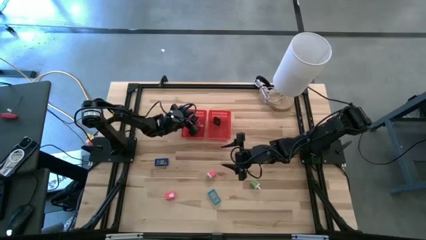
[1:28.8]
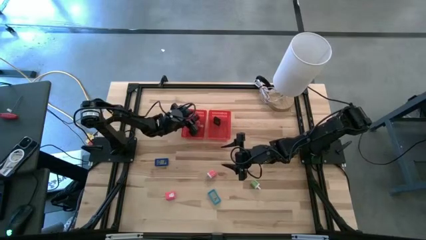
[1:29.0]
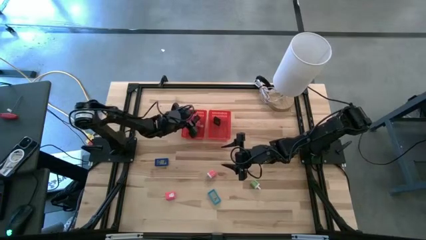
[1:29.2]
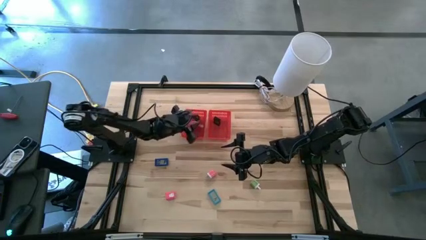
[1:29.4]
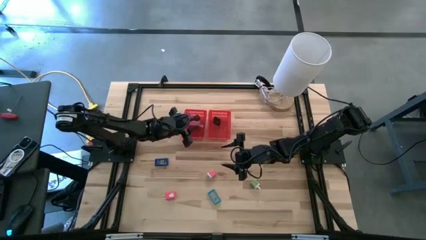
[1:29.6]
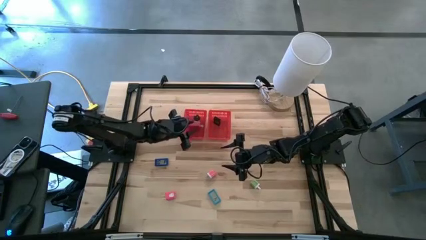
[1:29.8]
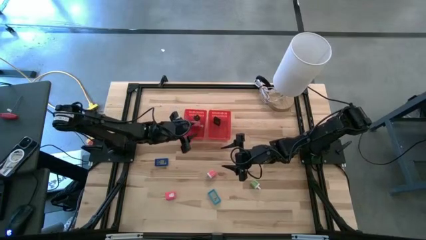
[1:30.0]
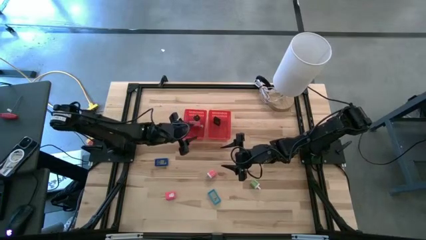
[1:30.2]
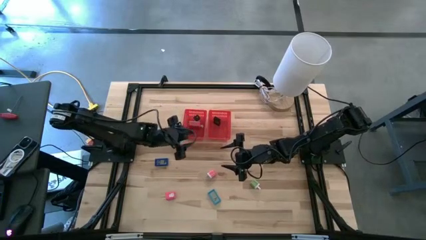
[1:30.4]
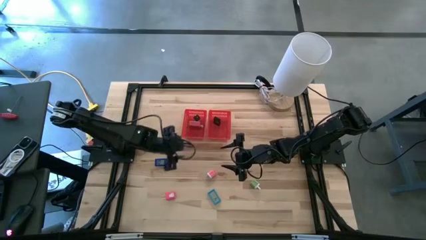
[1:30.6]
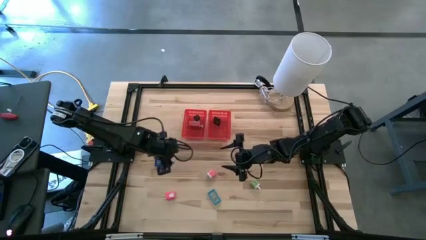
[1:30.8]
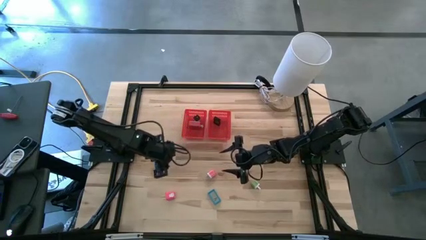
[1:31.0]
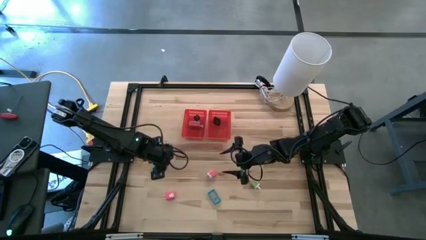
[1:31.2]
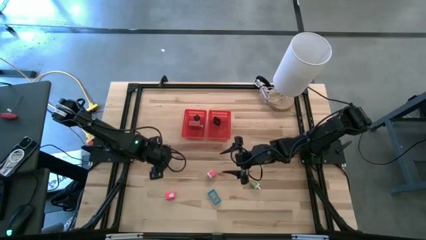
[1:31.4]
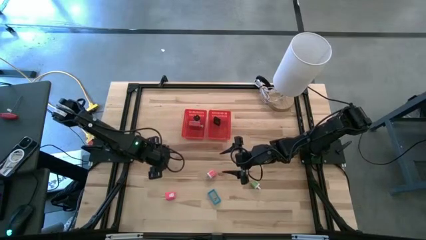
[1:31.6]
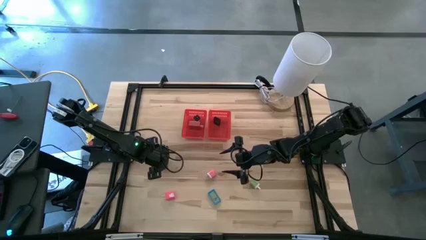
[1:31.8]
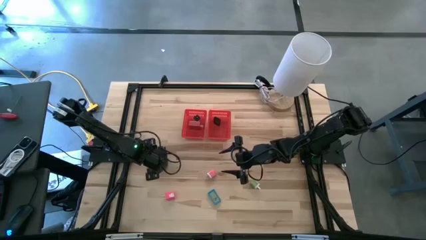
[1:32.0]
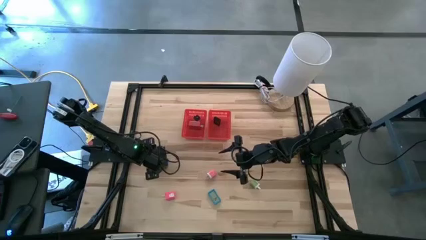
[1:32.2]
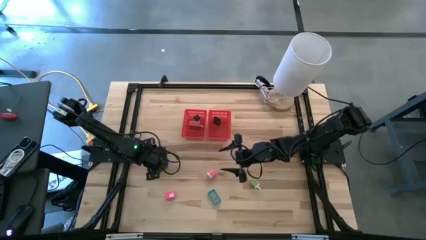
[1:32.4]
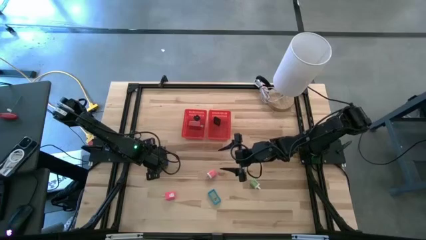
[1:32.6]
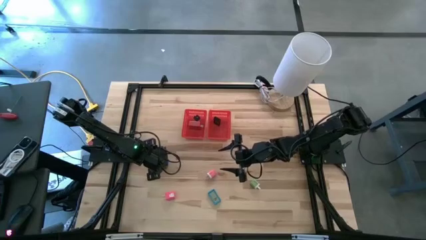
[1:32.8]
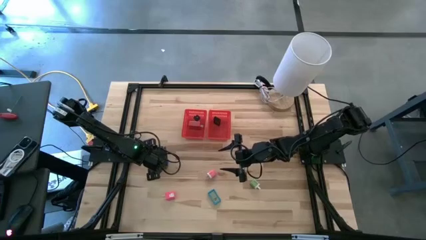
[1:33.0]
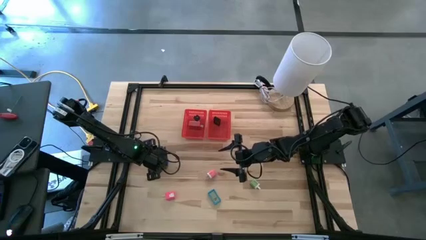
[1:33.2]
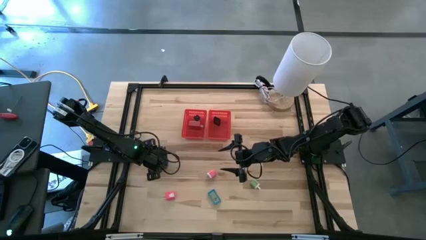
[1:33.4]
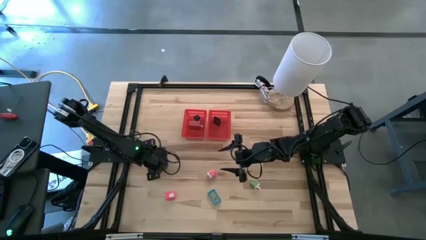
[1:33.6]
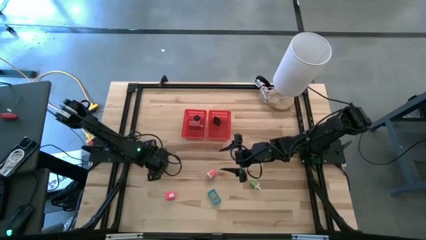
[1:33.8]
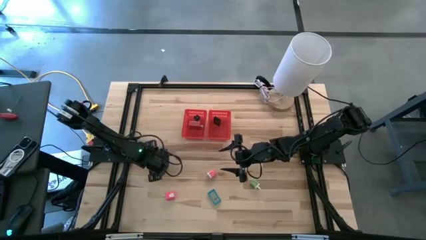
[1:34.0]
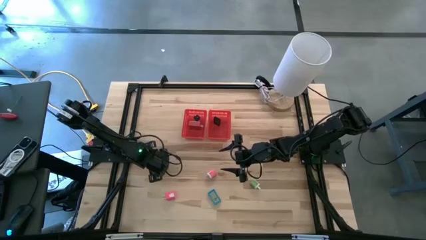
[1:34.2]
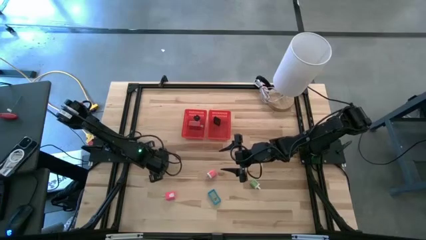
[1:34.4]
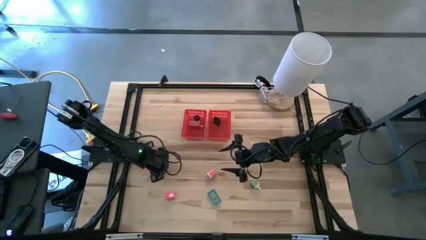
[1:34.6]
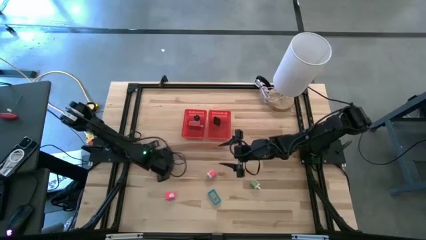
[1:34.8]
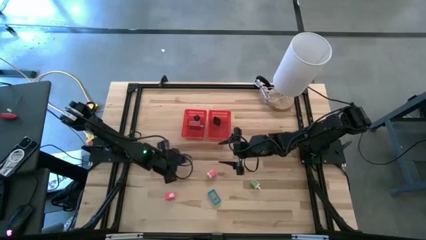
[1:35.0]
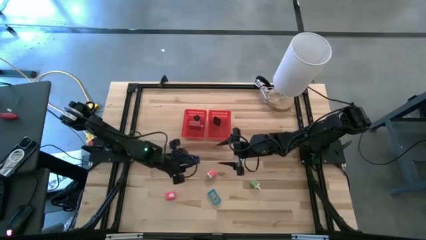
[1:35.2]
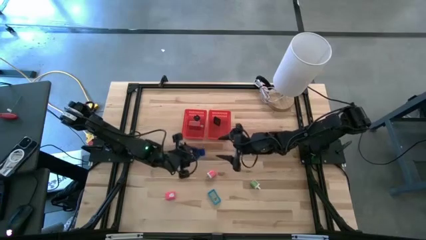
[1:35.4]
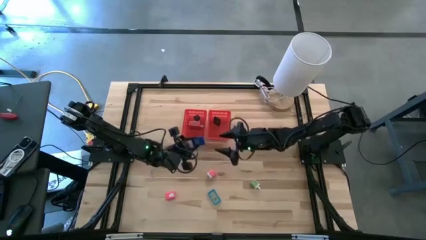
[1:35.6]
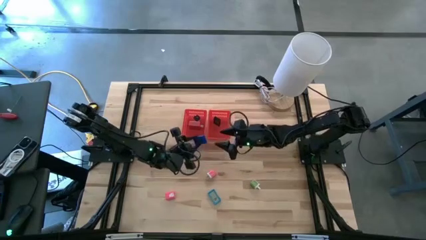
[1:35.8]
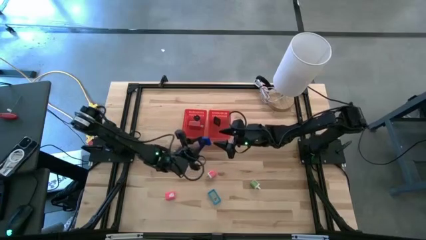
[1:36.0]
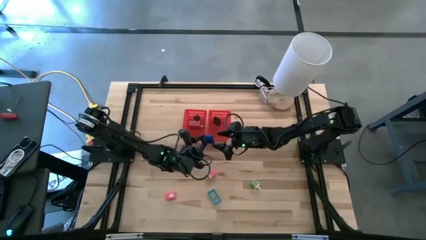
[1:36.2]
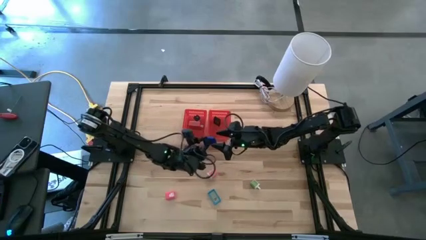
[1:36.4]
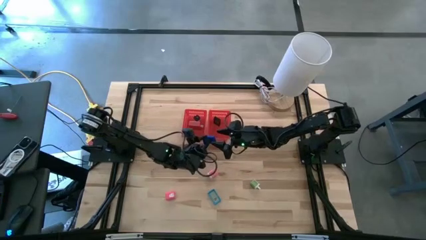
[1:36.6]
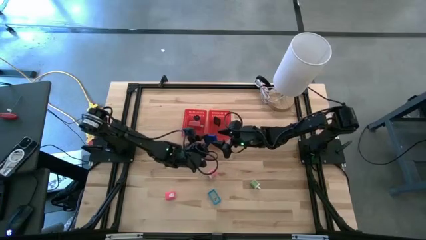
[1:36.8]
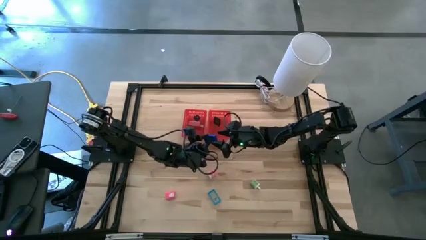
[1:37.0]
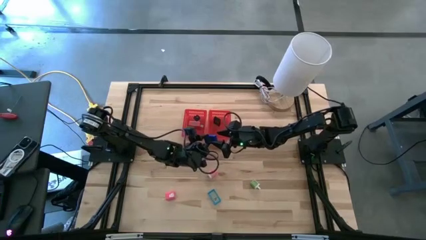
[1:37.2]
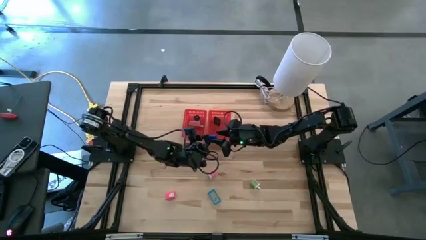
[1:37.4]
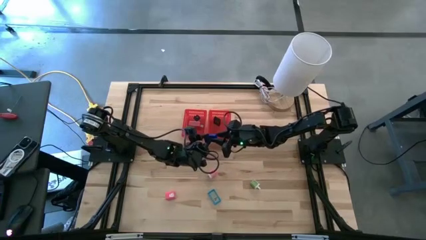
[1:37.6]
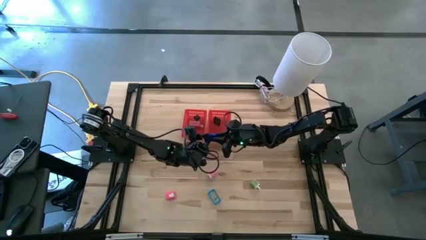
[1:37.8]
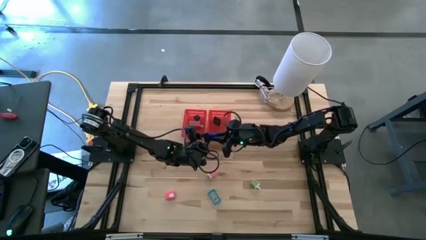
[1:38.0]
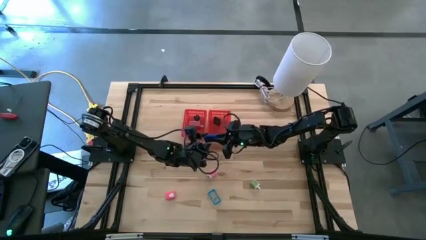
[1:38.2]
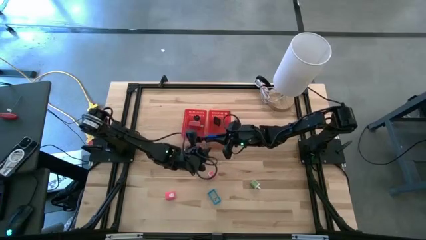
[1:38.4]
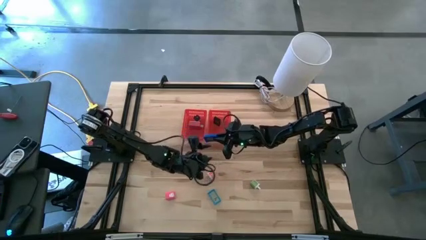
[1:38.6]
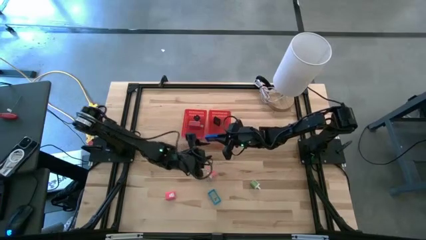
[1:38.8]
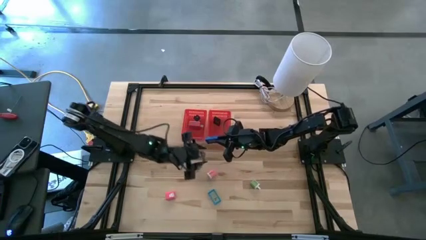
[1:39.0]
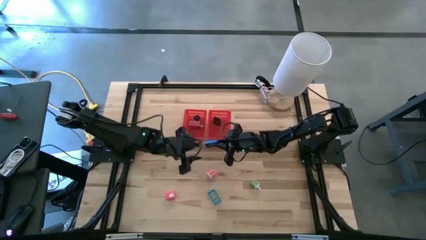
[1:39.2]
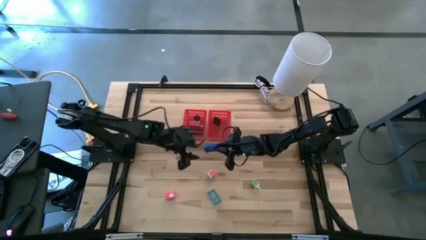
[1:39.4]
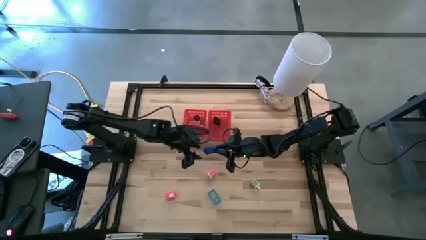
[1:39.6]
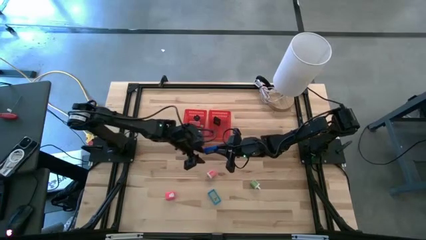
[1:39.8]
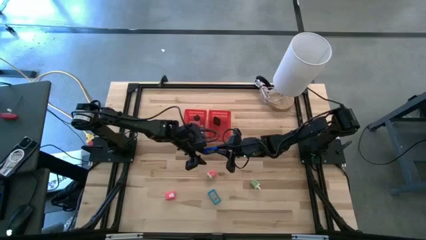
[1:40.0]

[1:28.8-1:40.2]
Task: Pick & Place Office items
Put the dark blue digital clock into the right red bin

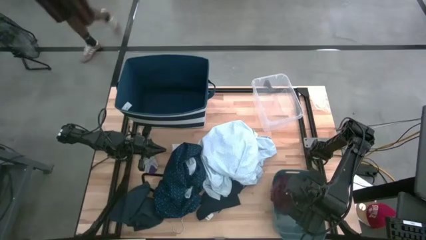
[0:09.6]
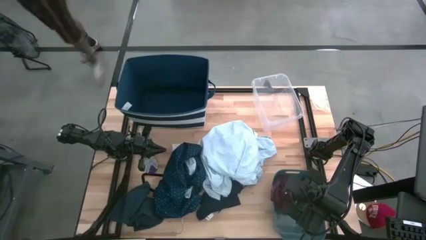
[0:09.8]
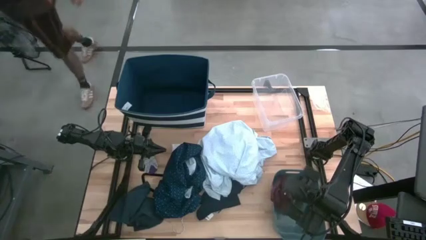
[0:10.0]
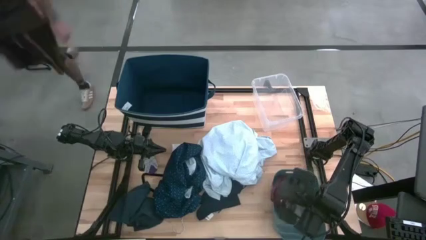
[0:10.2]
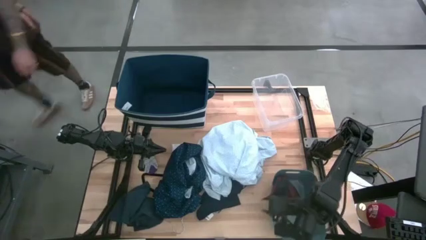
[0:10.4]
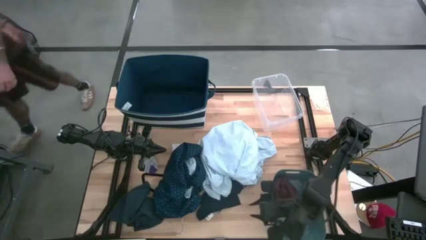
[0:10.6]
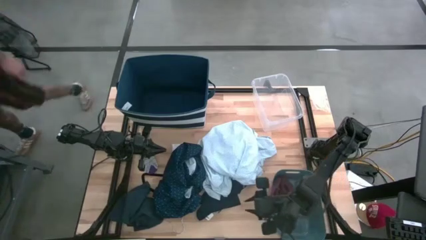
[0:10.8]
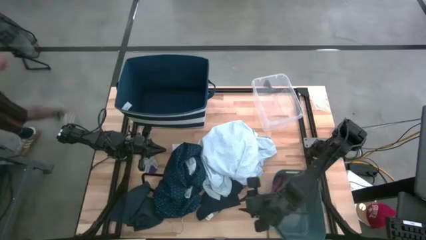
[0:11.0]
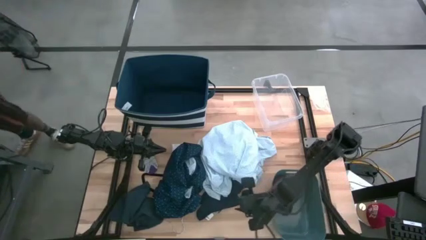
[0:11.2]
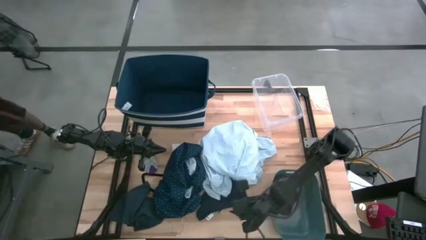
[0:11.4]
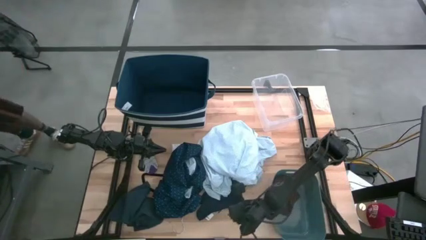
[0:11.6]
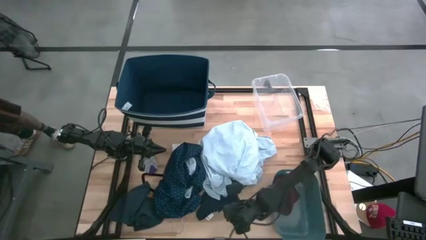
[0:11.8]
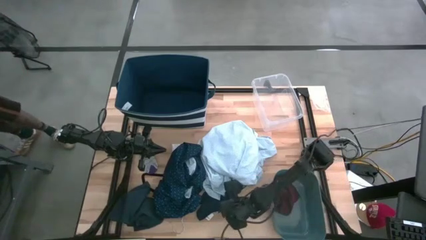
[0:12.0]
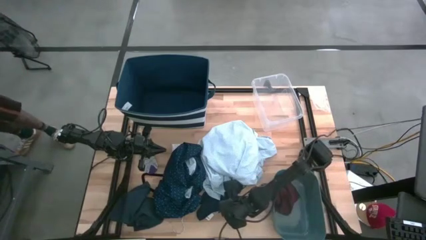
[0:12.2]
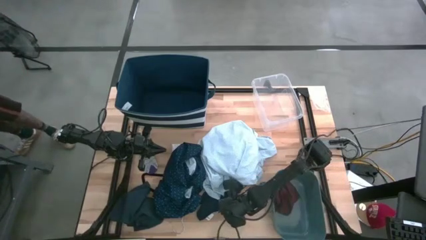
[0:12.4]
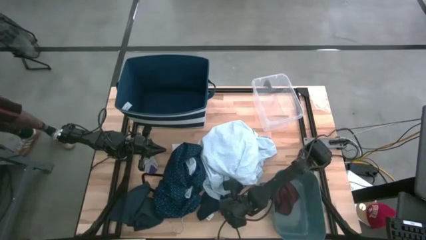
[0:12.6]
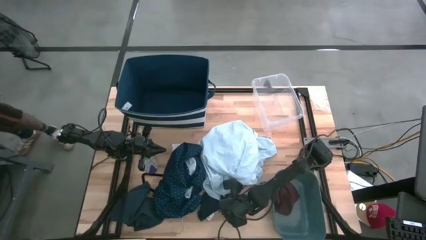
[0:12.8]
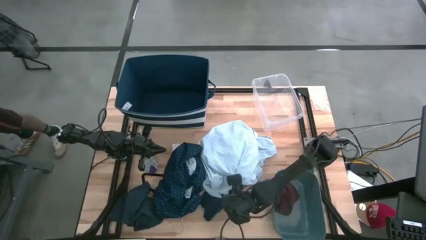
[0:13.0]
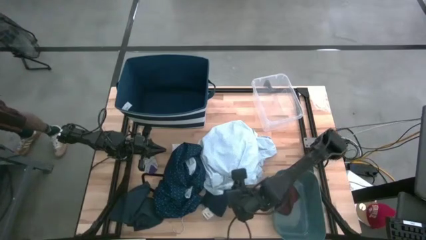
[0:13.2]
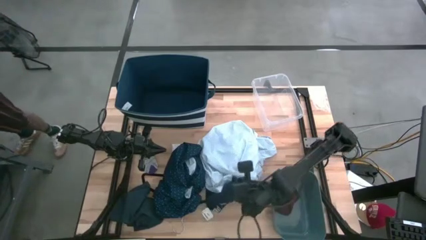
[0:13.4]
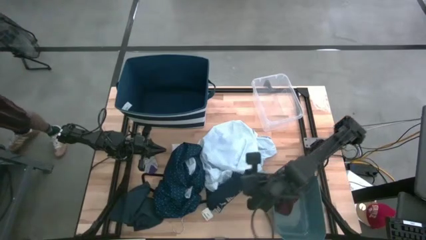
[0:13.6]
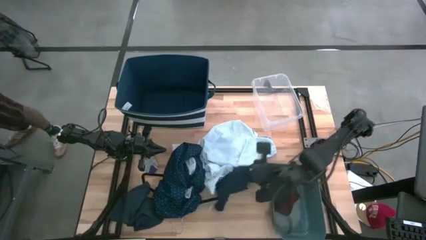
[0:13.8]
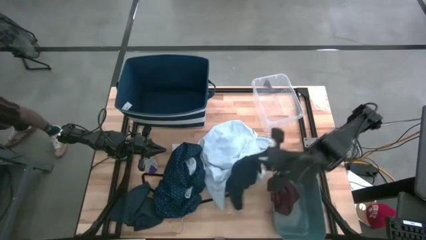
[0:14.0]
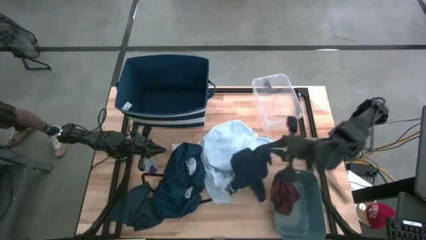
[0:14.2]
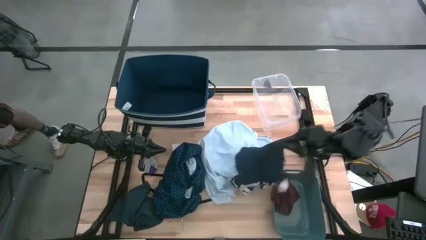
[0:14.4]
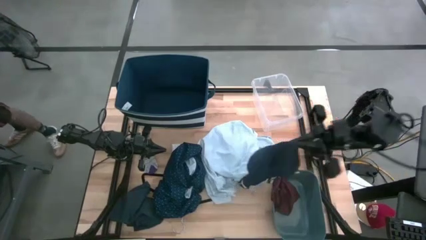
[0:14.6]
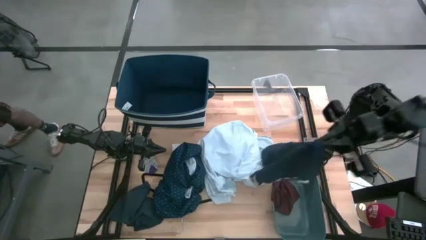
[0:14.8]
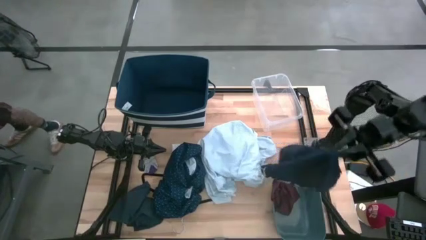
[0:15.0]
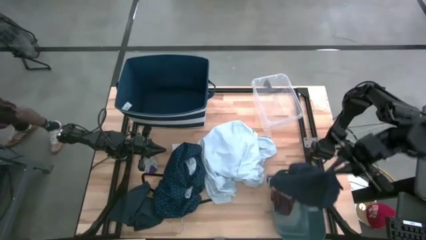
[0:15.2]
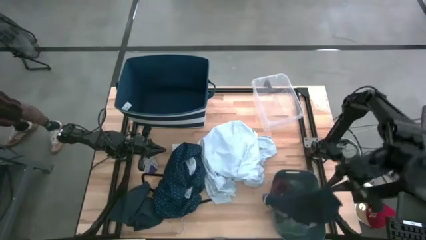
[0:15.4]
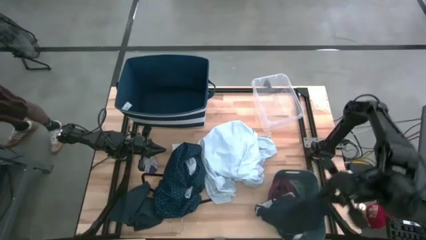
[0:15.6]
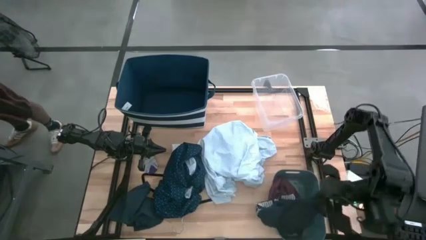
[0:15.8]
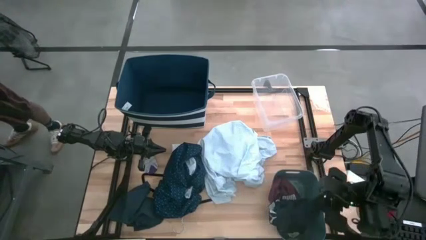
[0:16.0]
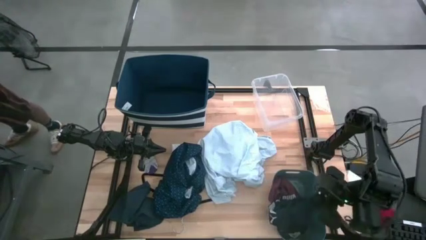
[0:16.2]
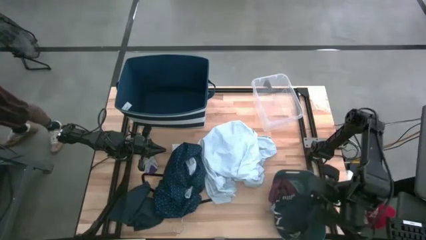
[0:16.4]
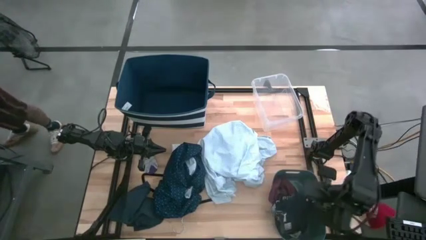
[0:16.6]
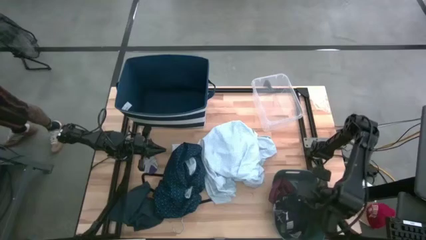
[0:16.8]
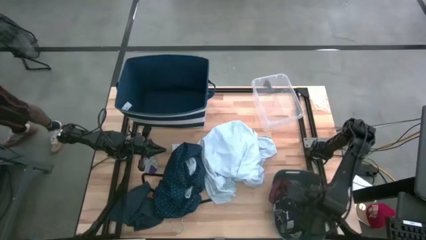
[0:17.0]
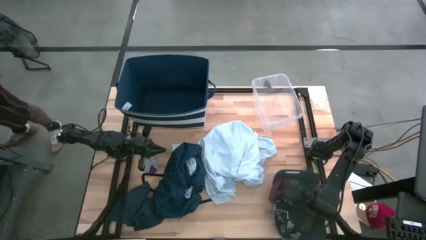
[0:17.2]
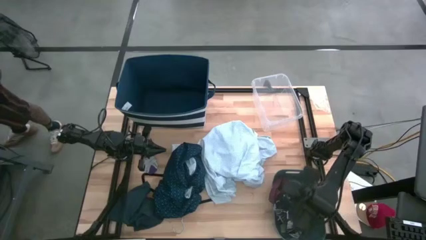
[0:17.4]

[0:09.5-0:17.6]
Task: Pick & Place Cloths
Put the blue boxer into the green bin
